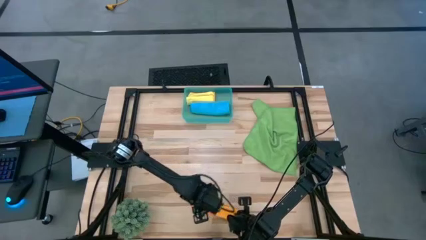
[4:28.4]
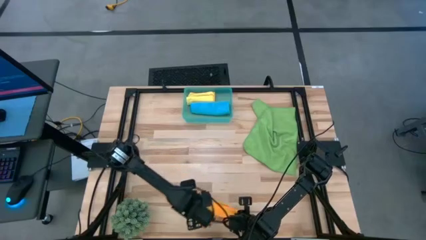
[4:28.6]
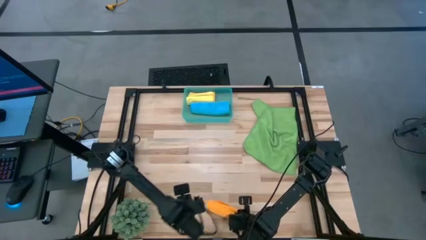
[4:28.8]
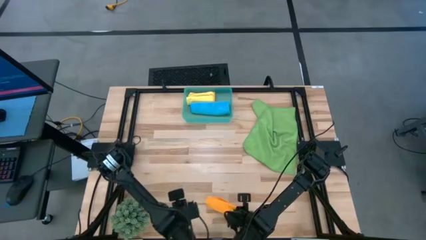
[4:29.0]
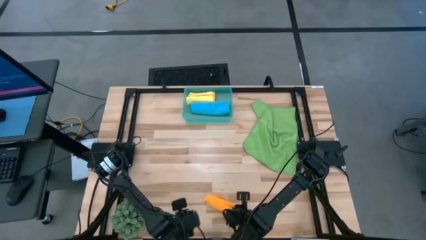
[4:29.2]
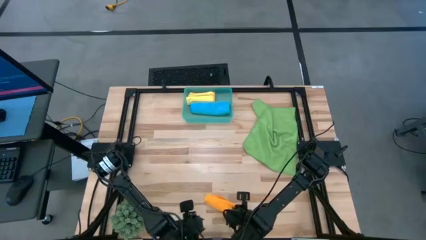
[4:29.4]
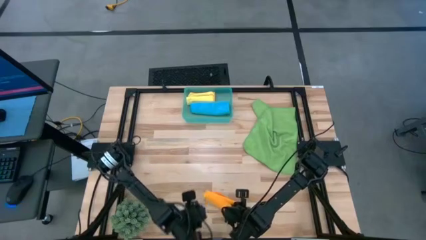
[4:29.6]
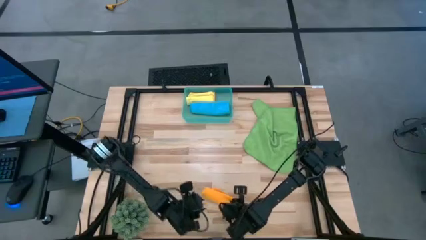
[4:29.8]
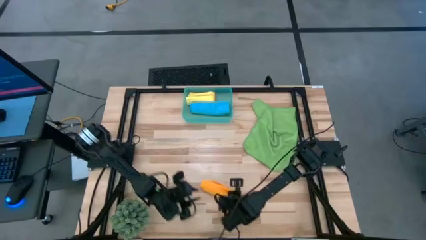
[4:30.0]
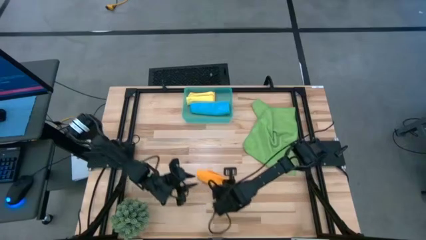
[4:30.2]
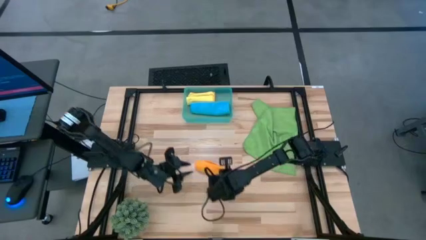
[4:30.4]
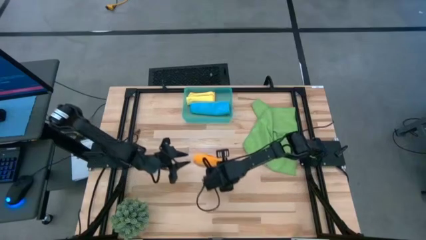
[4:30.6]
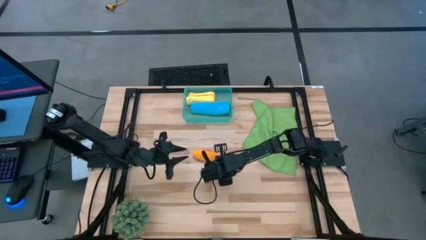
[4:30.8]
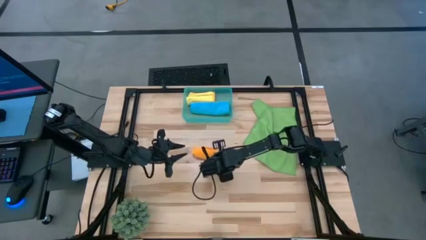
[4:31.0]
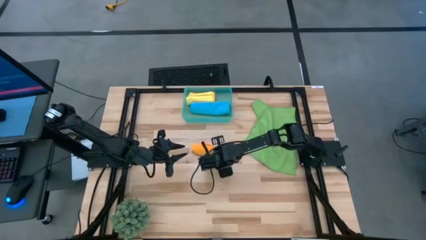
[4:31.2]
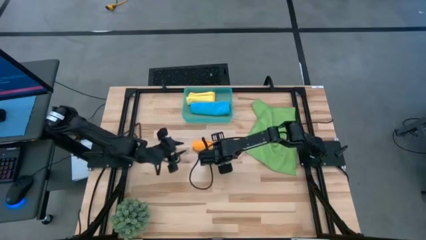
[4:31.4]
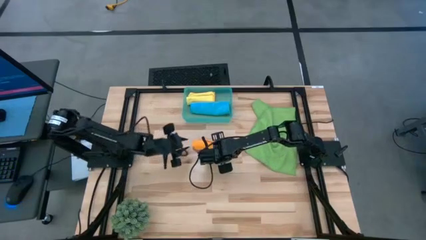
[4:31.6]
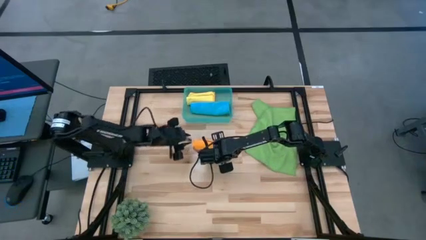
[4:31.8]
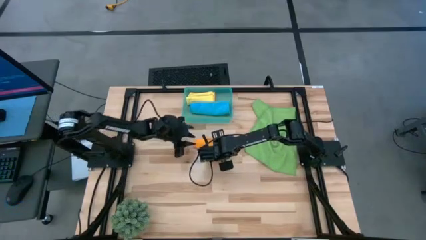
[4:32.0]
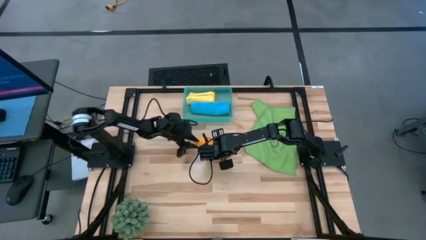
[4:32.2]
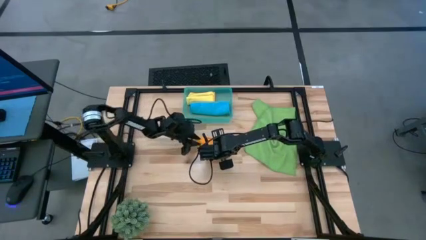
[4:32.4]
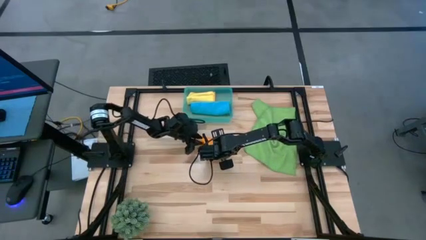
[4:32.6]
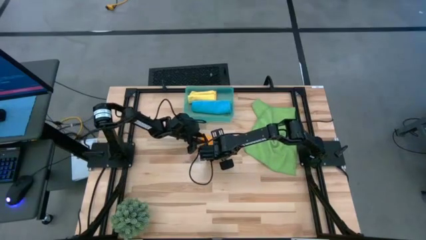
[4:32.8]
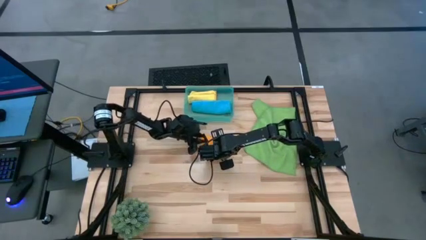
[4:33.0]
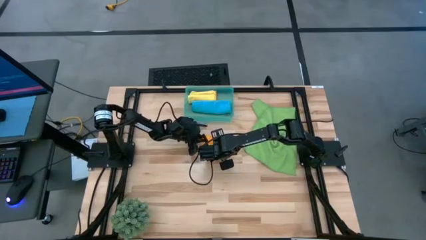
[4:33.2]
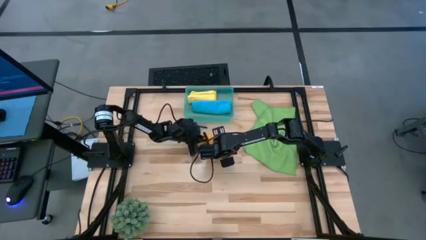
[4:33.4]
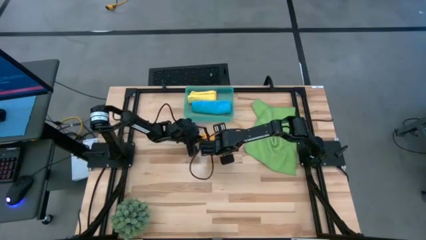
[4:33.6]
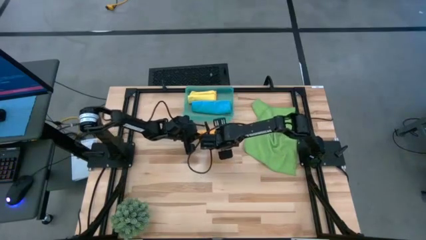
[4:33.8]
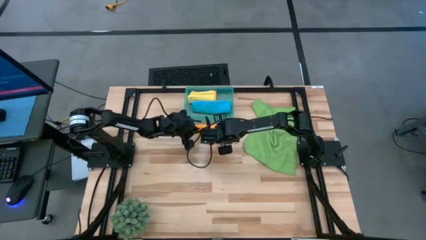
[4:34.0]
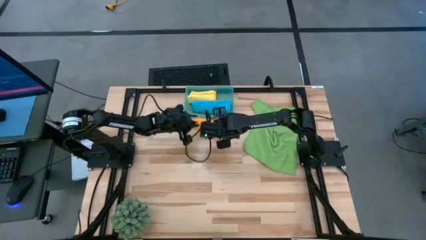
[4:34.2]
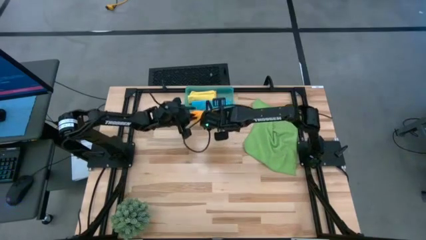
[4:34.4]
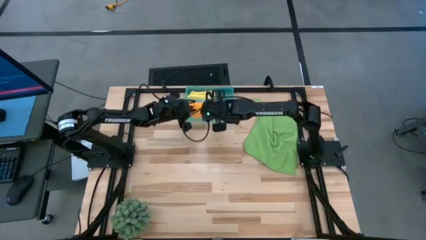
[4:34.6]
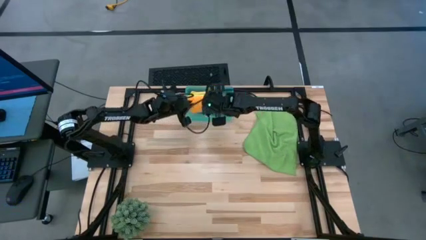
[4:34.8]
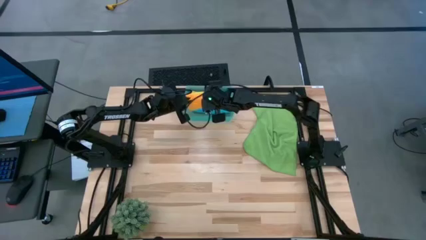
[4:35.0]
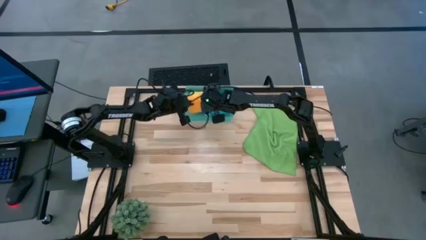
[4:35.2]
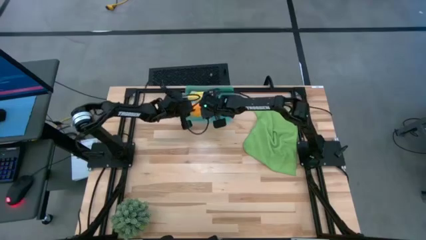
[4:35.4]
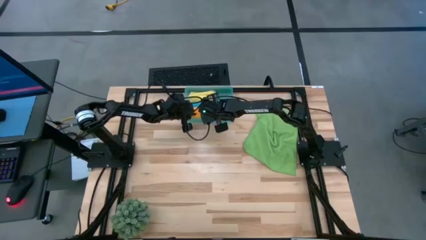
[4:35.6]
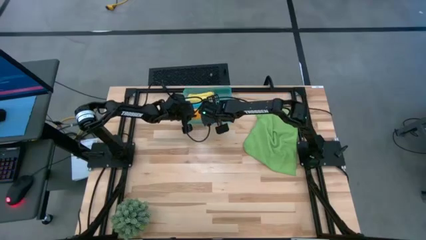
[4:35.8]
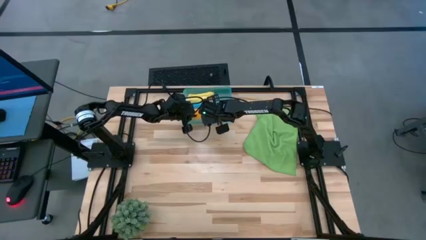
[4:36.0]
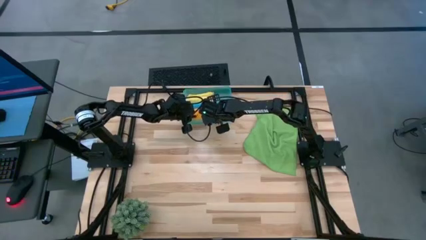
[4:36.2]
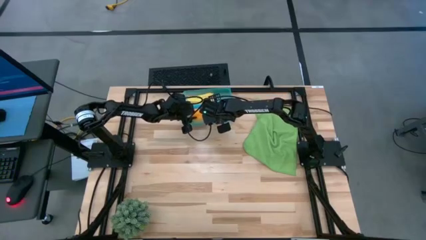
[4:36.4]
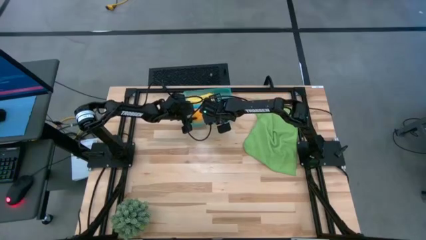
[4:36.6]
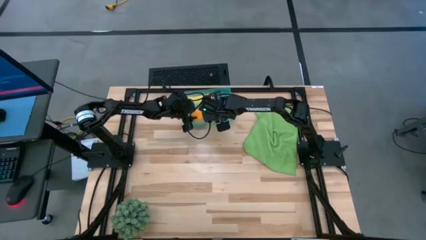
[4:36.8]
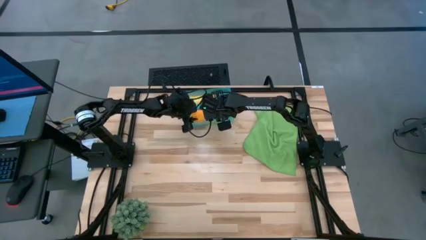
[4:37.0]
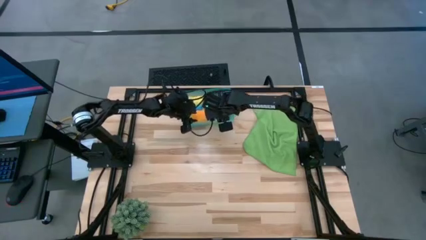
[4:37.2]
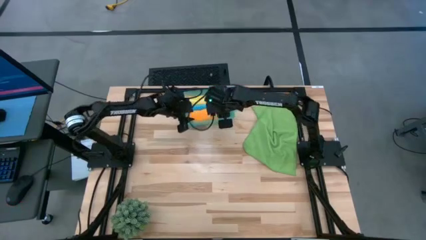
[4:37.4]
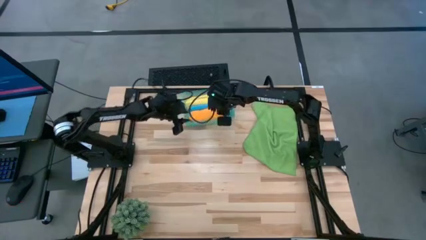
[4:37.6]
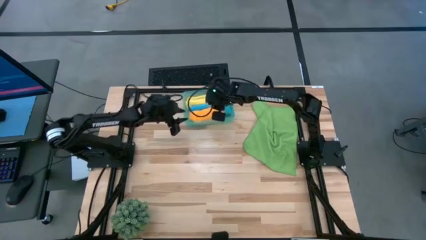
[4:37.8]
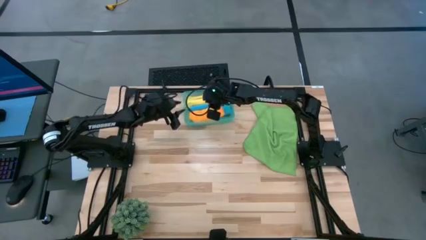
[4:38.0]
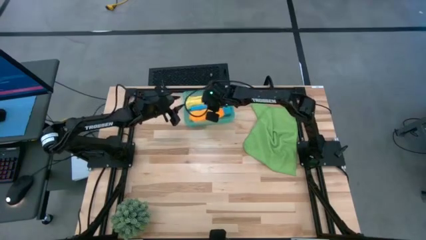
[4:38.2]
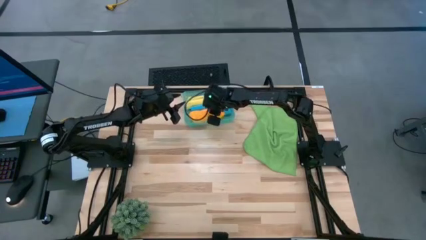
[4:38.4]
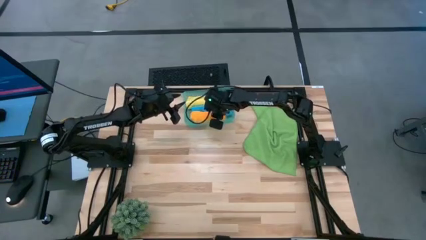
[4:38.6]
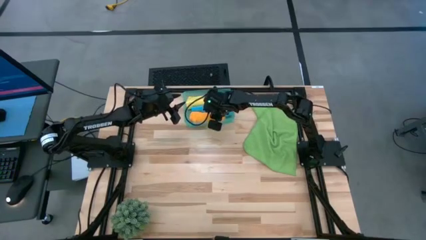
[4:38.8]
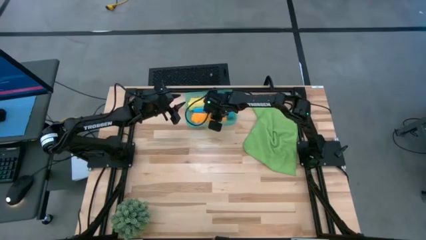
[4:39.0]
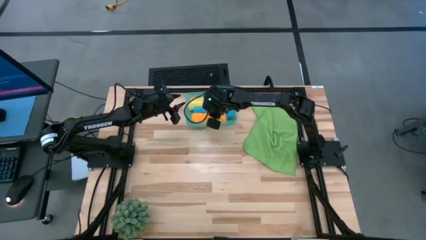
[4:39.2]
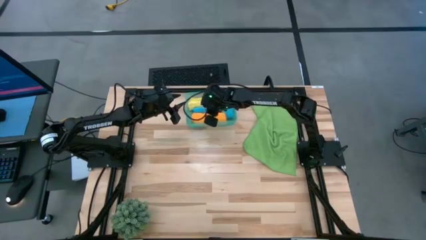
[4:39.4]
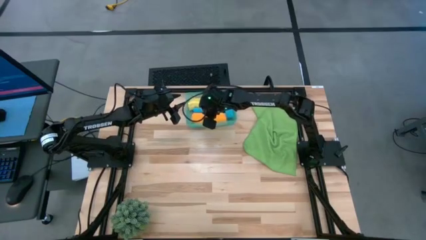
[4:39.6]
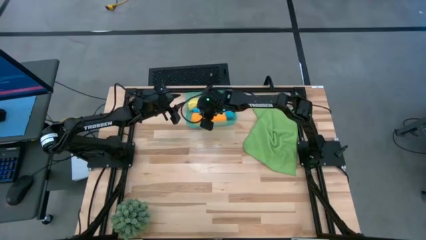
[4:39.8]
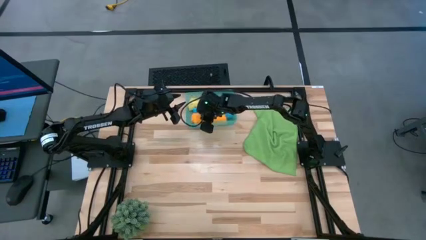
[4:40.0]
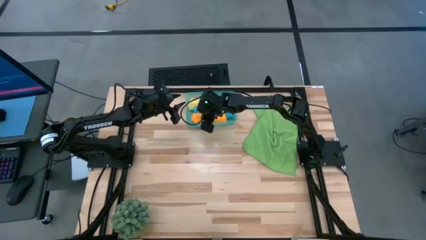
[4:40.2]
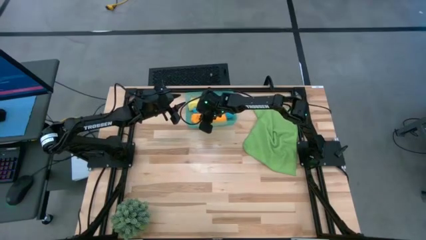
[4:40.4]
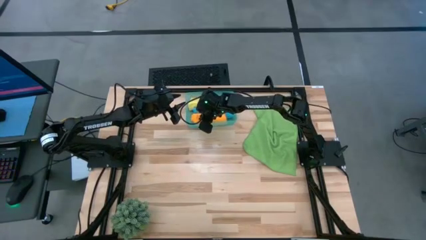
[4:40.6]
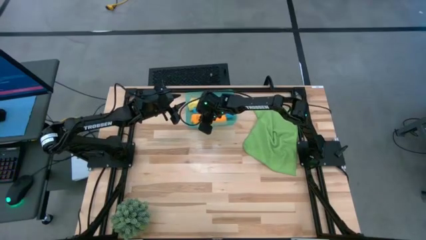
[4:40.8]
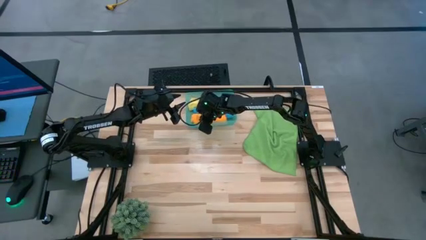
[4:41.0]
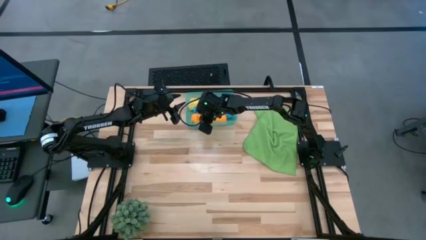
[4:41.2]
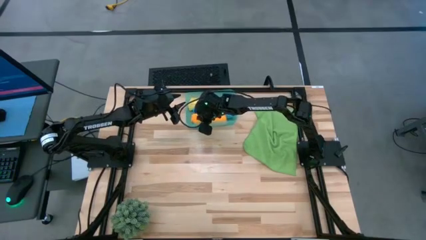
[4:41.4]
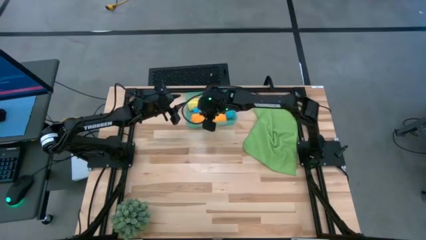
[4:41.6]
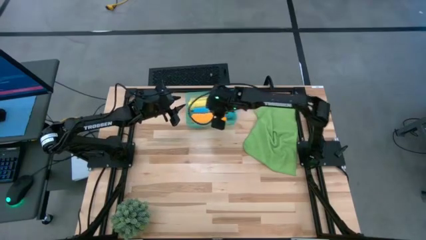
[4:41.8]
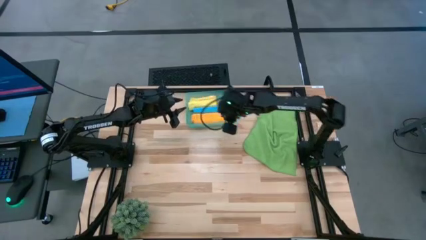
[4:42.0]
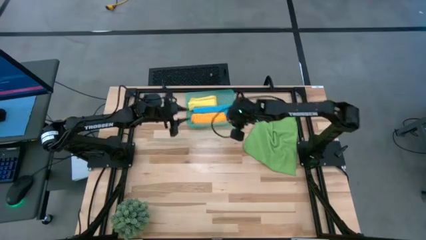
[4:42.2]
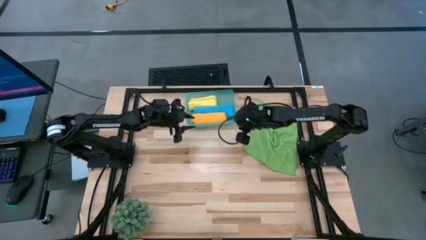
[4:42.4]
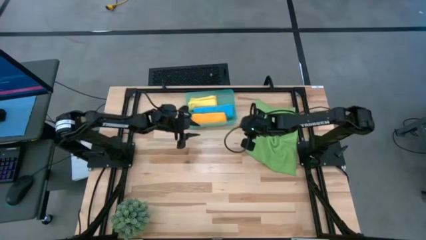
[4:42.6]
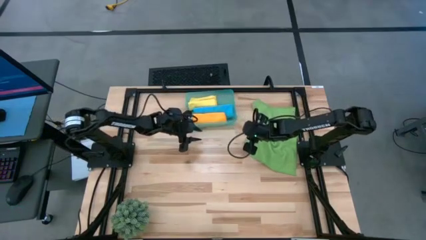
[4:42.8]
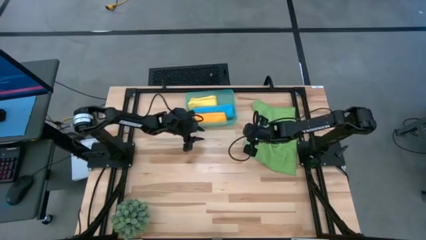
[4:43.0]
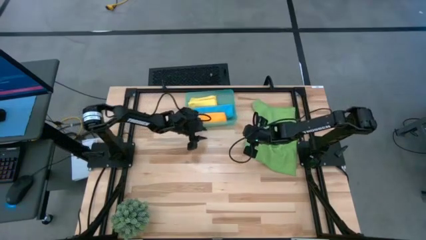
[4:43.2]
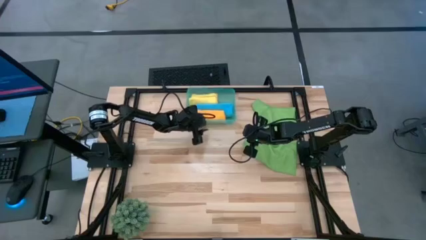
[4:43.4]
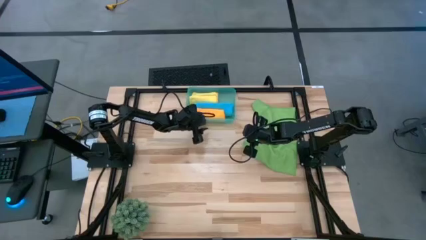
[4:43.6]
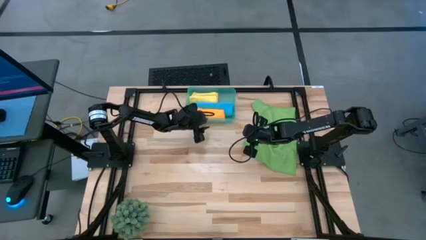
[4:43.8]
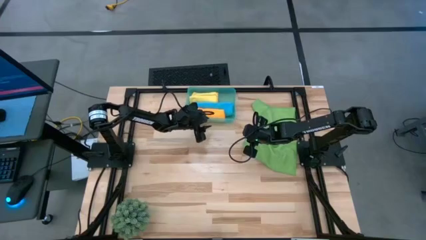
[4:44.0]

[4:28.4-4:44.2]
Task: Roll microfiber towels into tight, uniform cylinder then place into a basket
Put the rolled orange microfiber towel into the green bin
